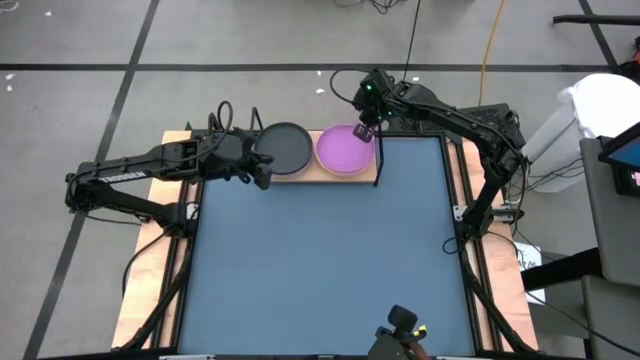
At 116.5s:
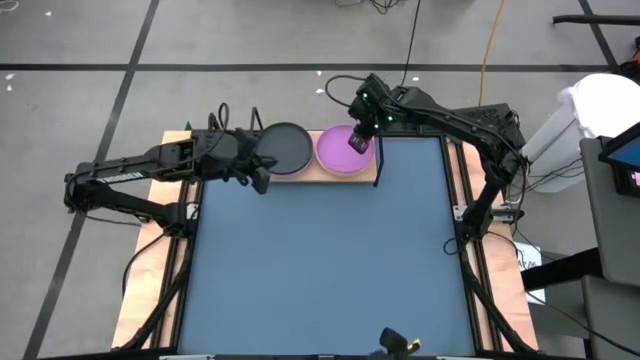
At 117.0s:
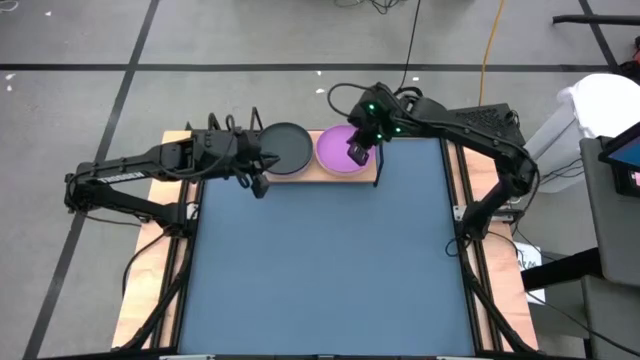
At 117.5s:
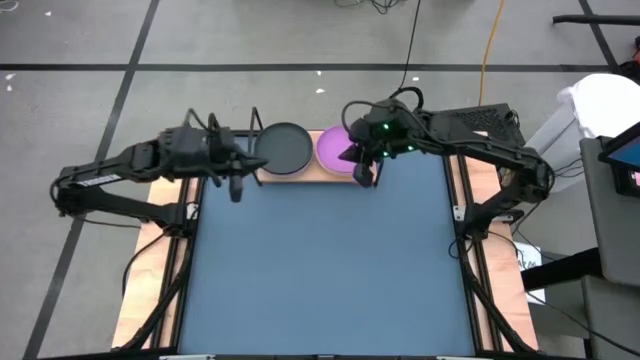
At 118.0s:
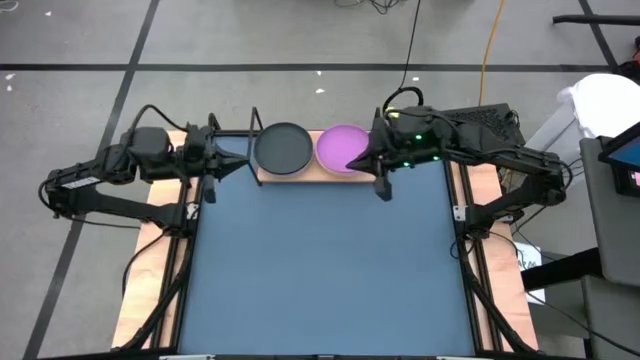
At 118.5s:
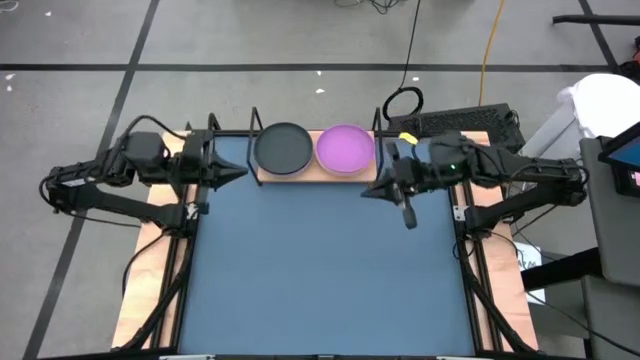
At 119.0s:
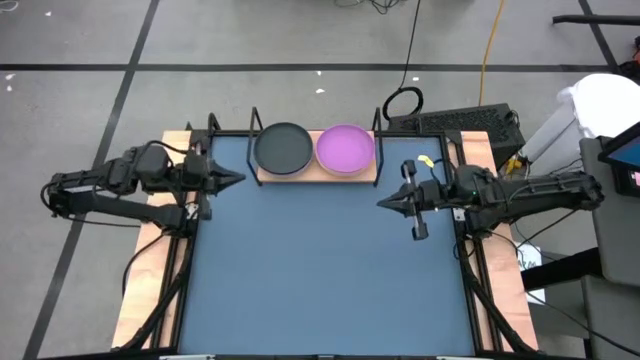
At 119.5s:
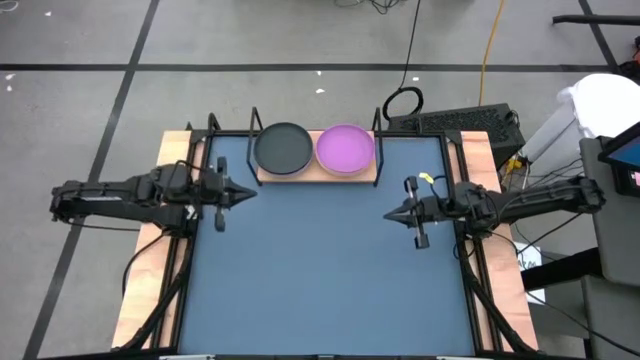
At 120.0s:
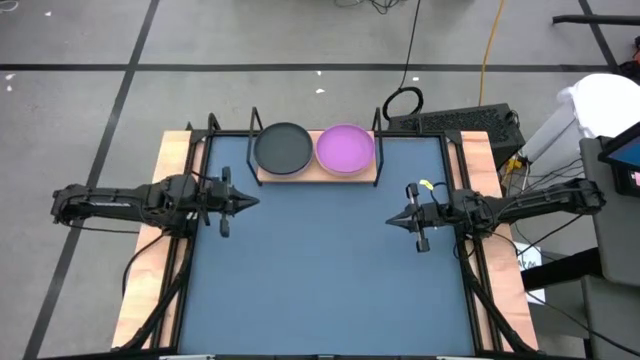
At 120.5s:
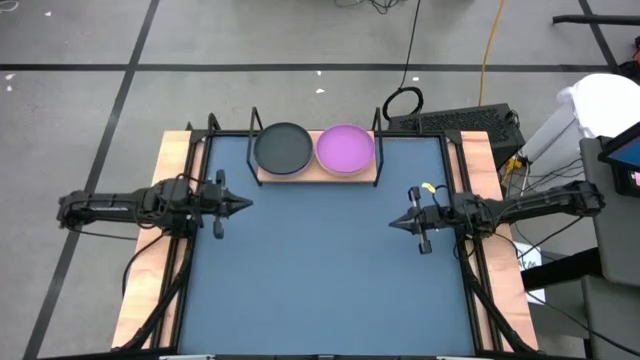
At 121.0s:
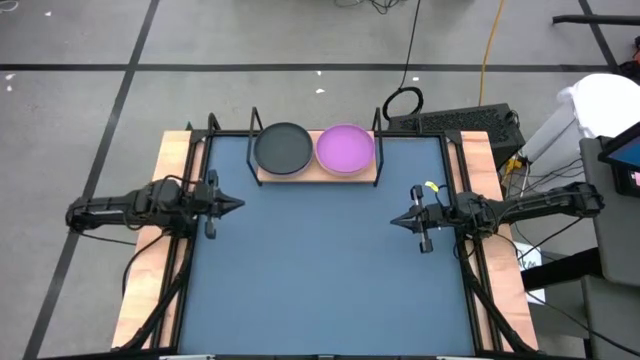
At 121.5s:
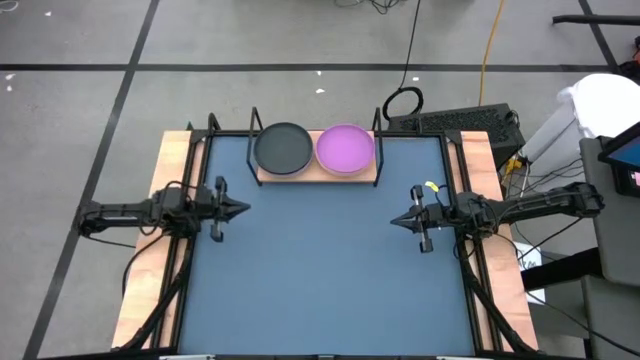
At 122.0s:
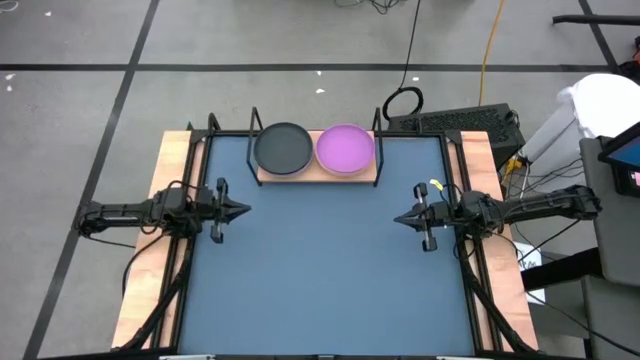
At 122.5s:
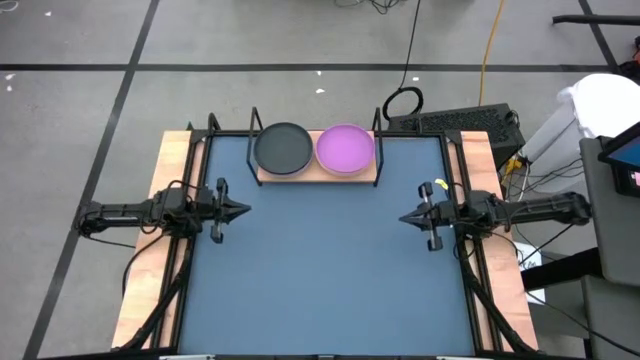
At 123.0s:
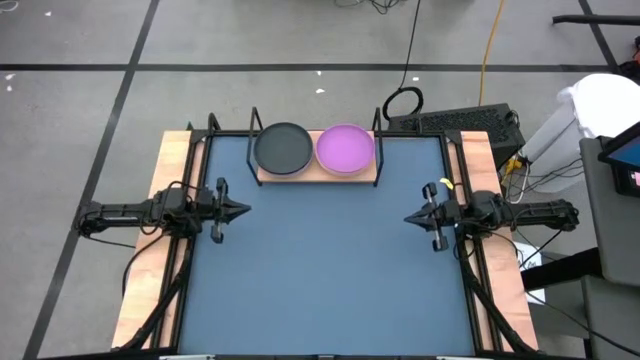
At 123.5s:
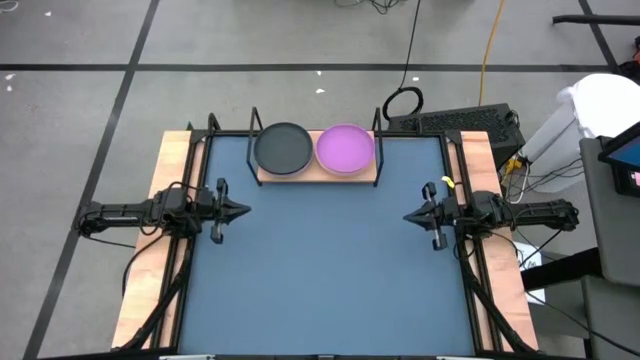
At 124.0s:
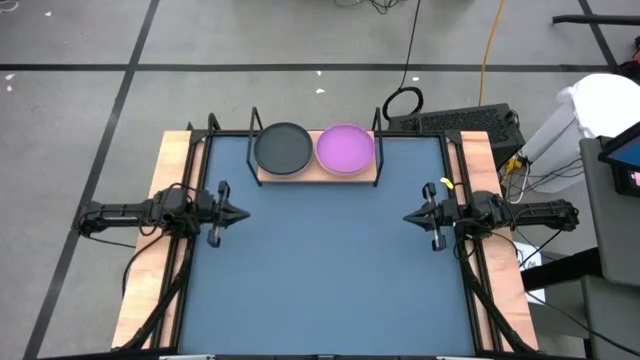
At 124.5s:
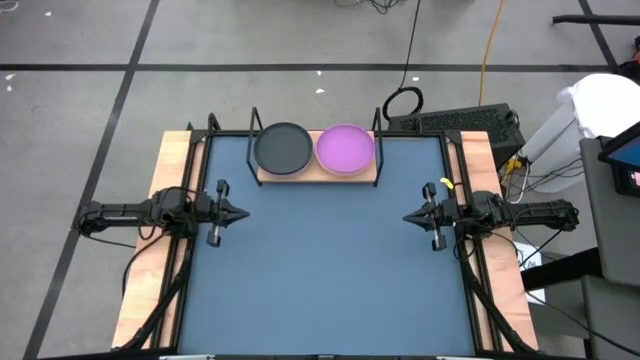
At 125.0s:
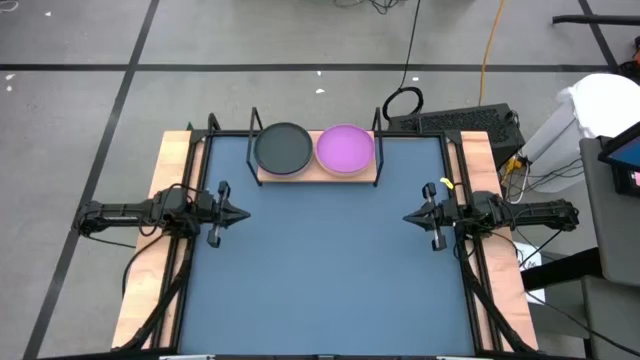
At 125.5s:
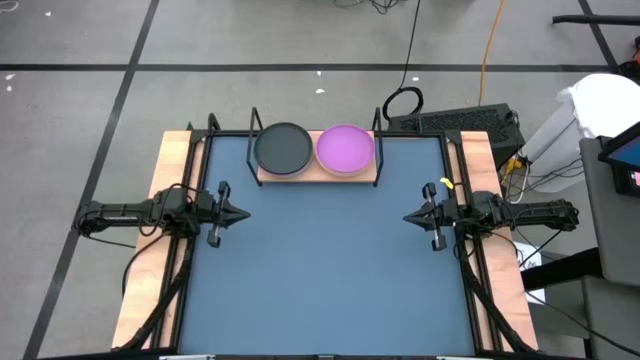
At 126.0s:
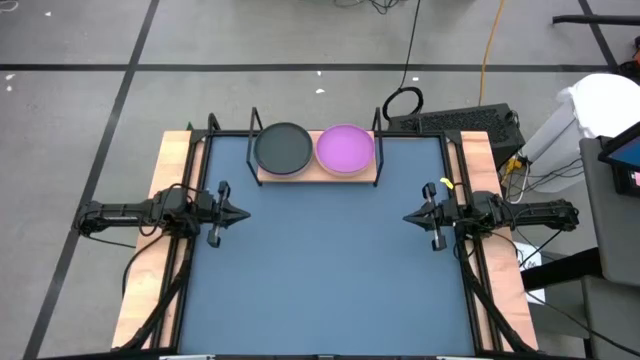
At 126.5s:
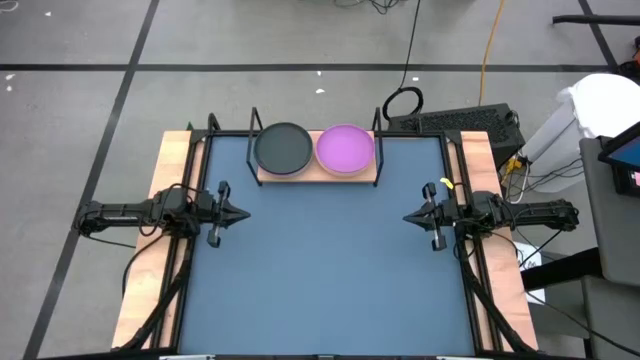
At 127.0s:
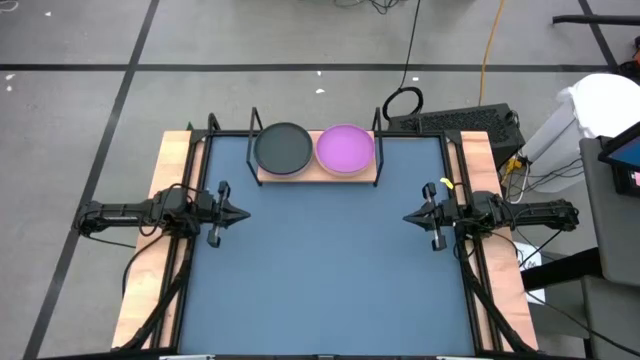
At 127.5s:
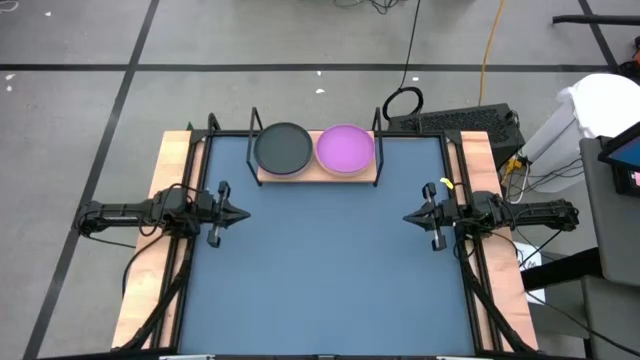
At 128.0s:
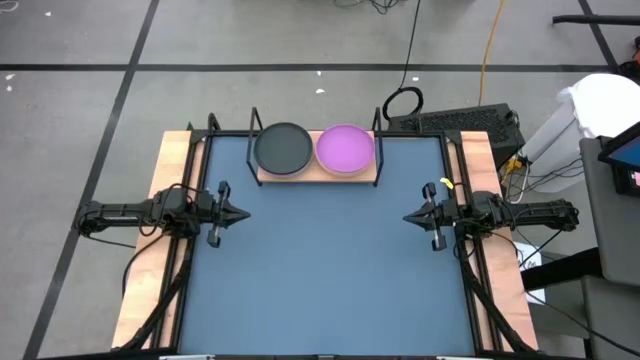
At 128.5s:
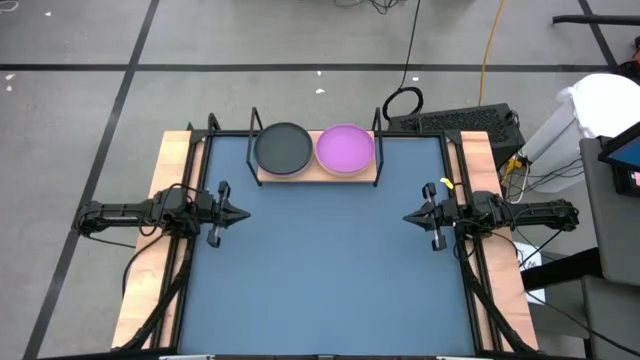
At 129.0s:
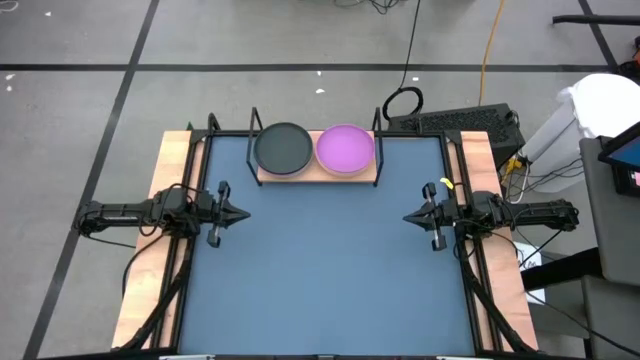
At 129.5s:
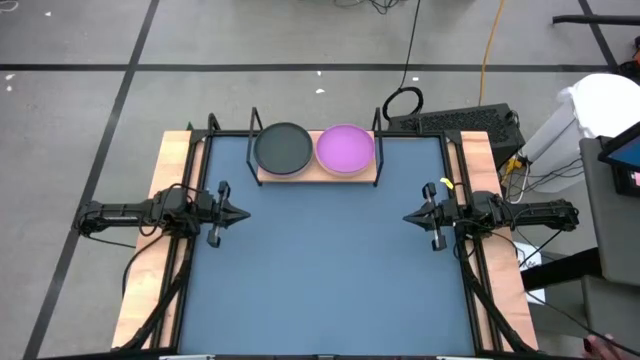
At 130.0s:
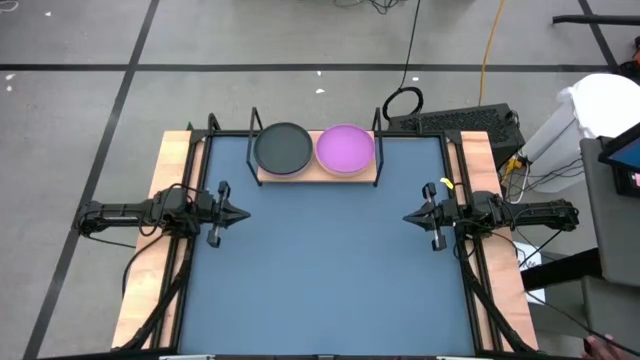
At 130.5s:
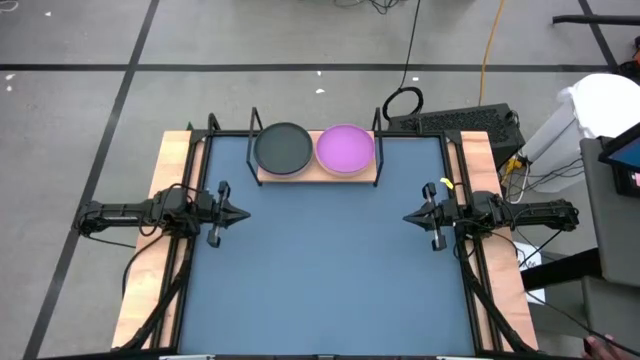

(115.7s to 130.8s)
Task: Place and stack plates onto a shelf
Return to Home Position

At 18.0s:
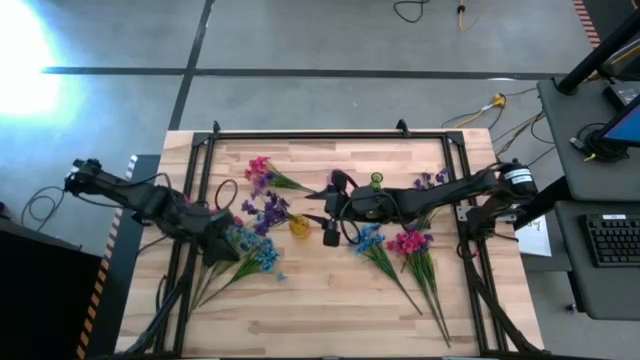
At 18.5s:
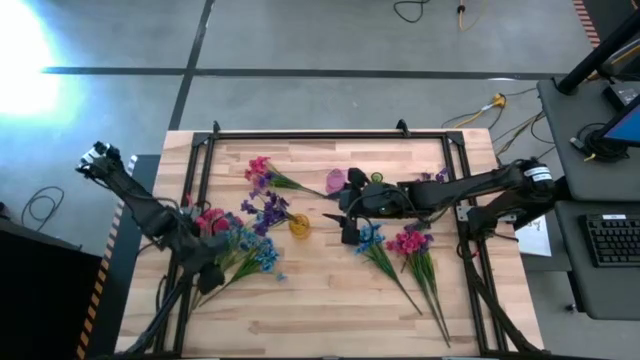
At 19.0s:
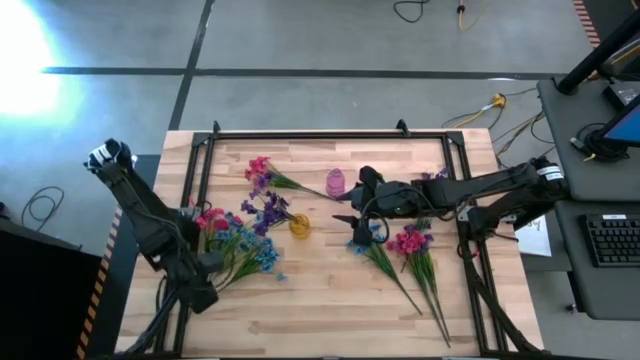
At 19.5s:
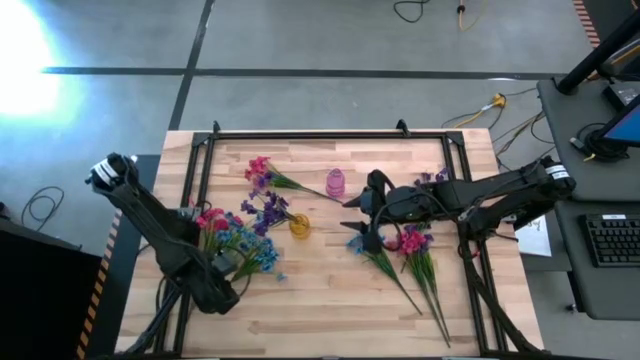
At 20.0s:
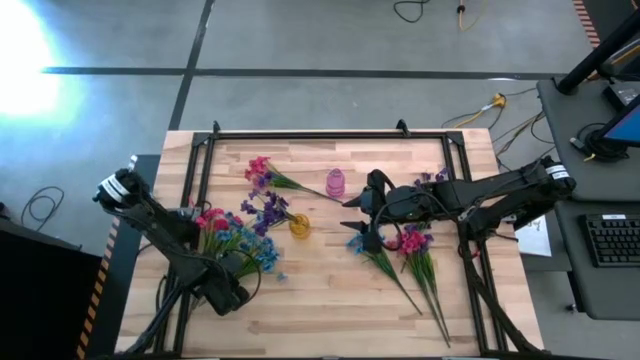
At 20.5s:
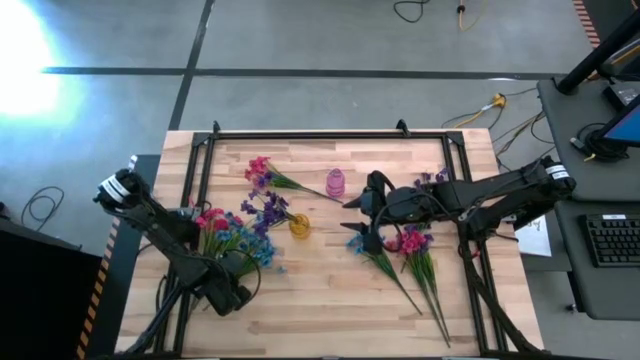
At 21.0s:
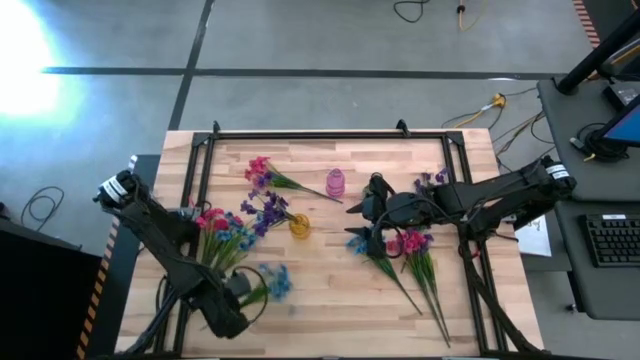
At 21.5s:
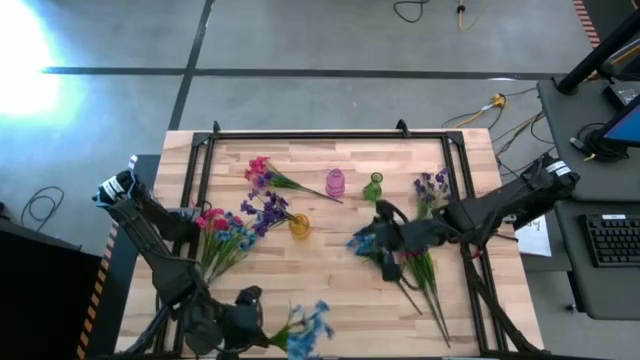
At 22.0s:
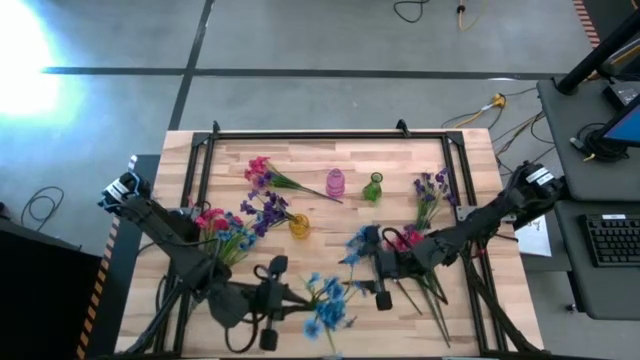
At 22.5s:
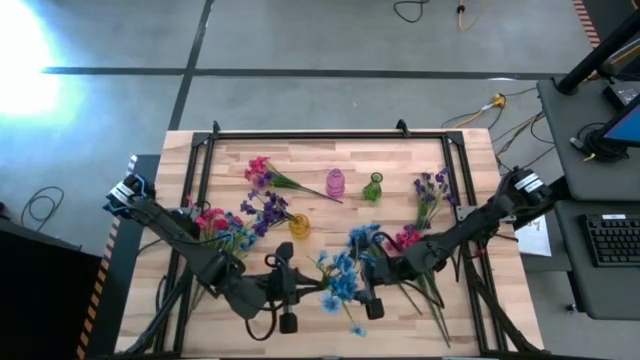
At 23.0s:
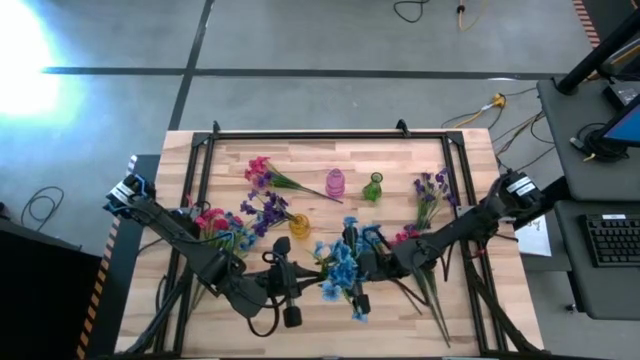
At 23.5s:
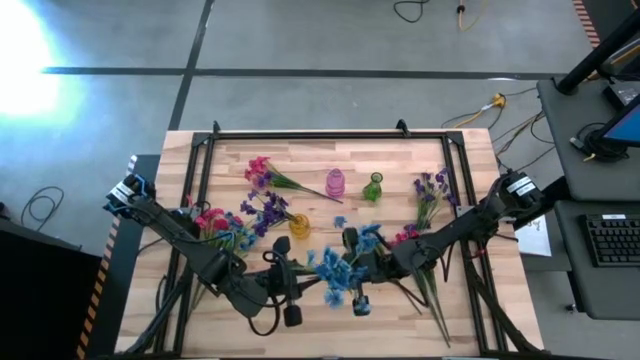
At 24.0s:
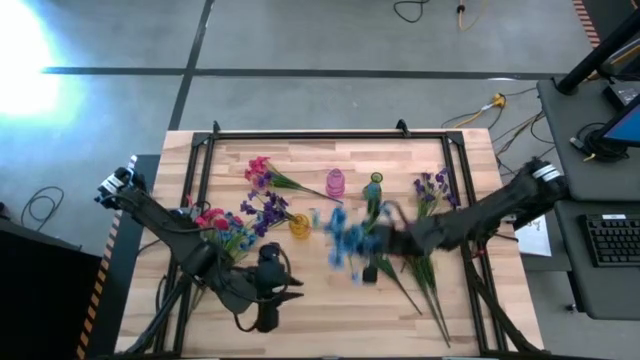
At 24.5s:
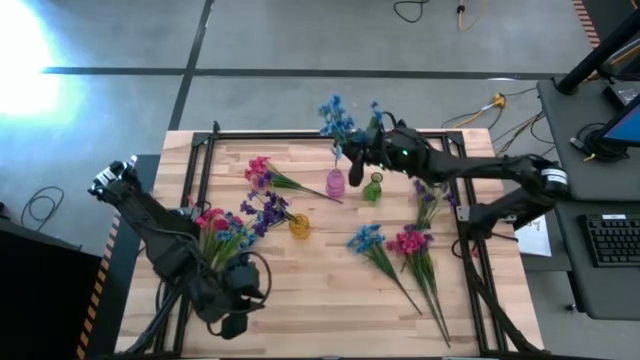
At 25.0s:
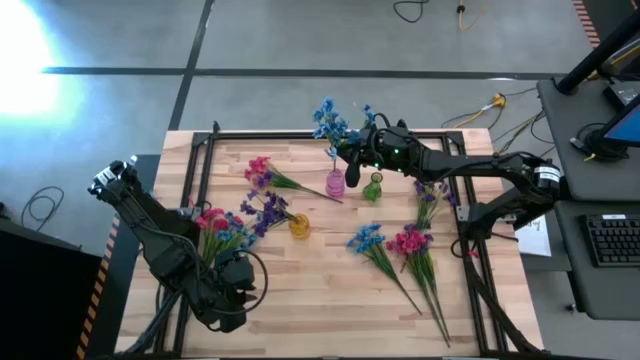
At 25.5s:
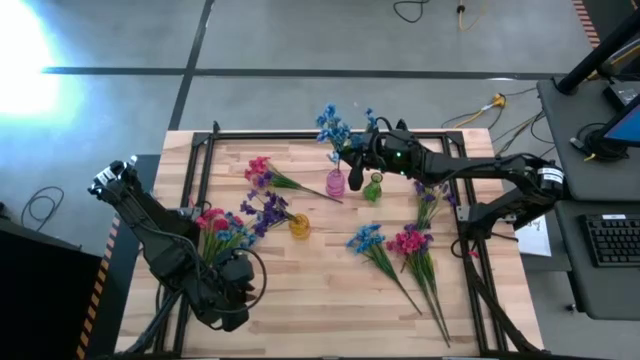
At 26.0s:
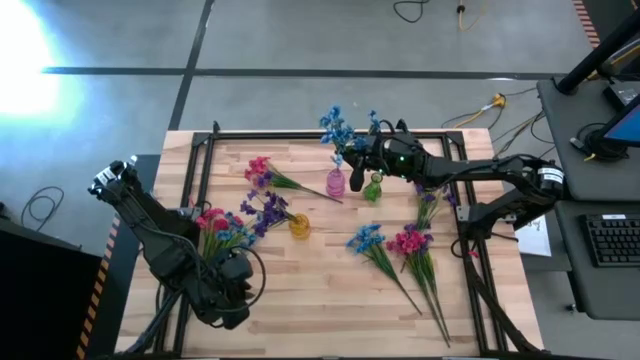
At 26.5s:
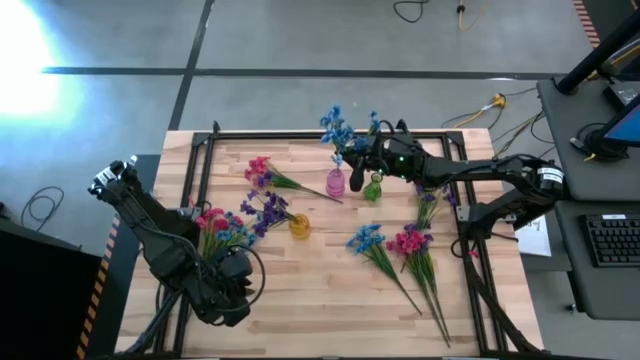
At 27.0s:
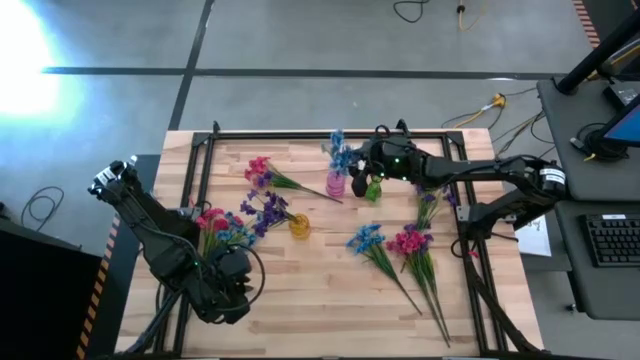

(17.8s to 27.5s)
Task: Sort flowers into vase by color
Put the middle blue flowers into the pink vase
